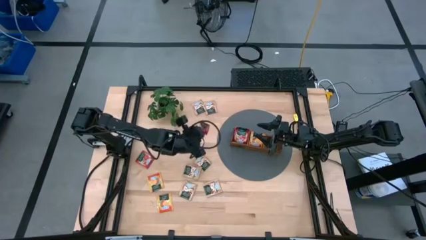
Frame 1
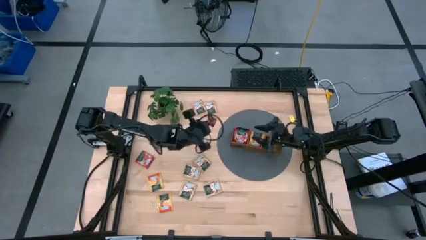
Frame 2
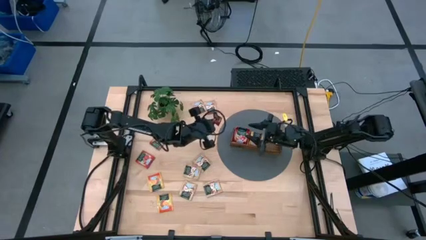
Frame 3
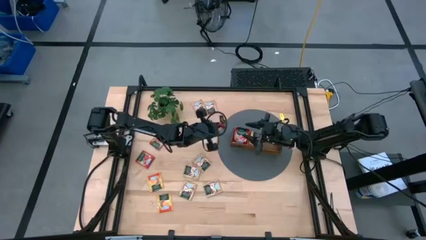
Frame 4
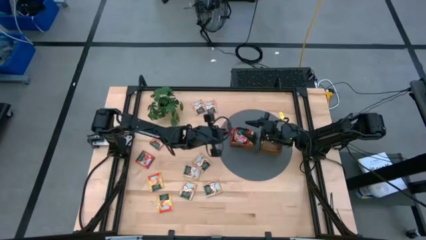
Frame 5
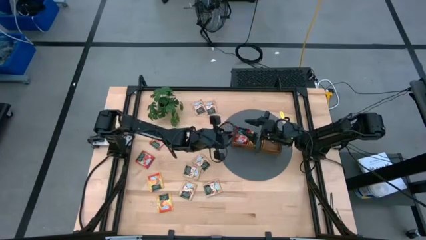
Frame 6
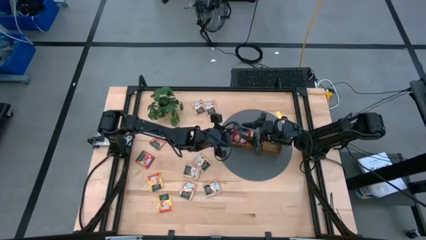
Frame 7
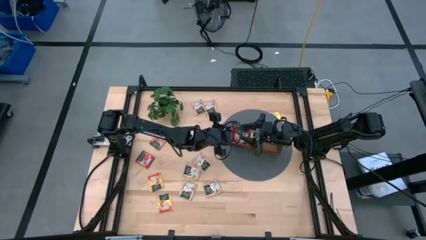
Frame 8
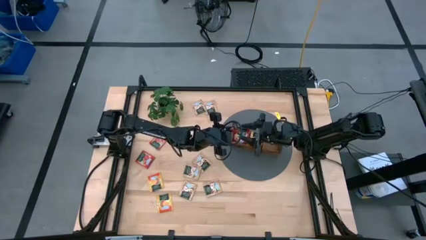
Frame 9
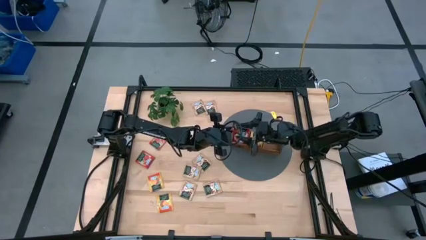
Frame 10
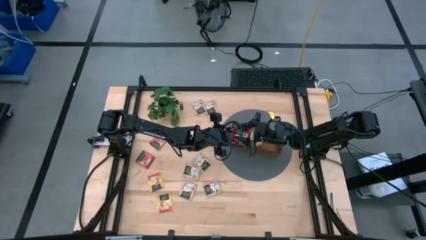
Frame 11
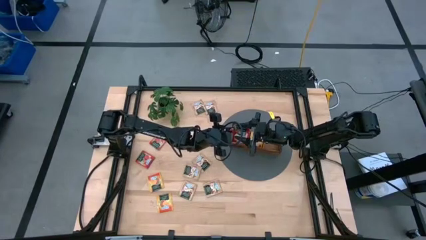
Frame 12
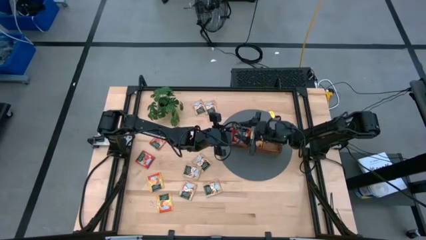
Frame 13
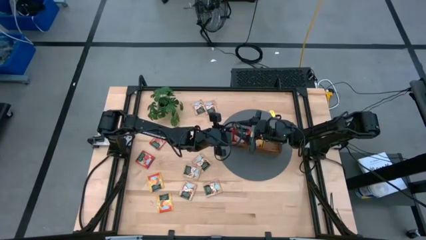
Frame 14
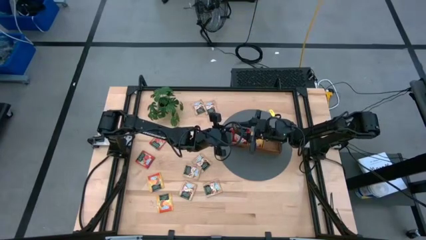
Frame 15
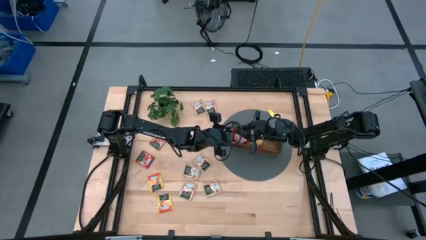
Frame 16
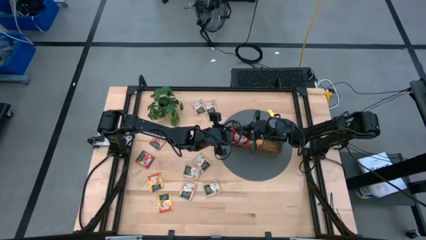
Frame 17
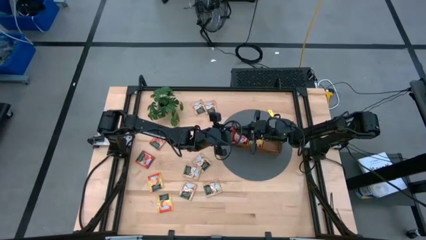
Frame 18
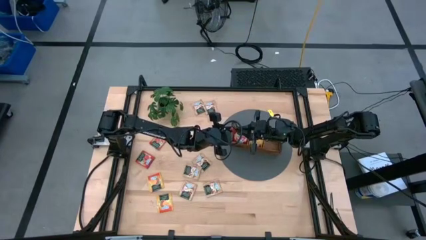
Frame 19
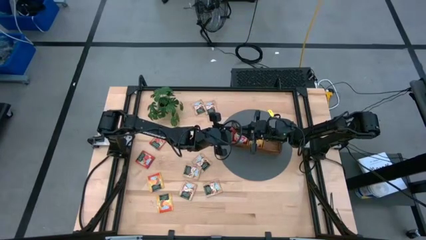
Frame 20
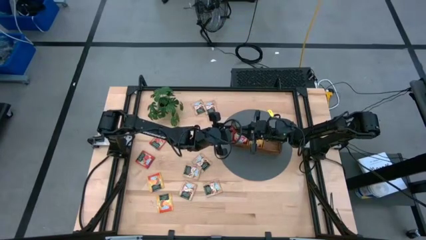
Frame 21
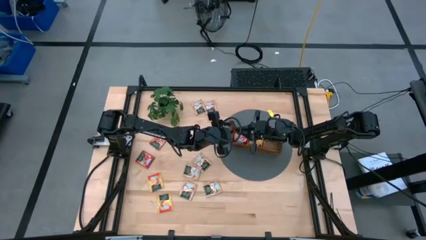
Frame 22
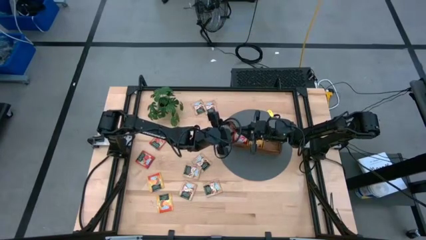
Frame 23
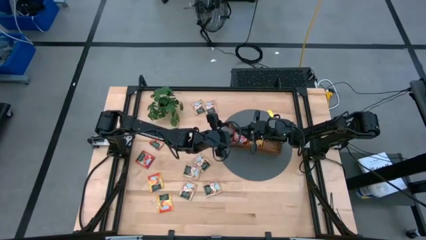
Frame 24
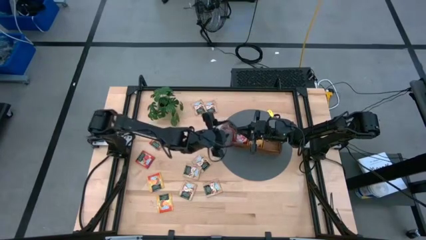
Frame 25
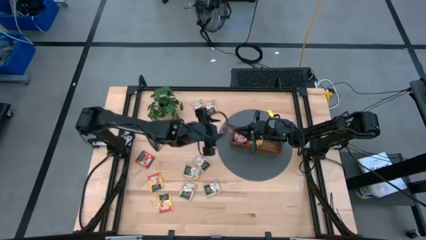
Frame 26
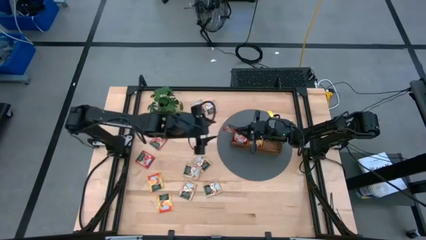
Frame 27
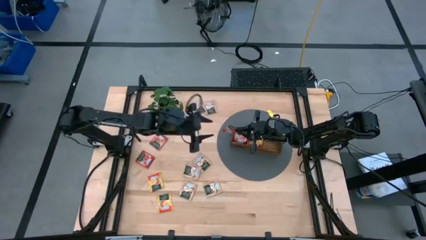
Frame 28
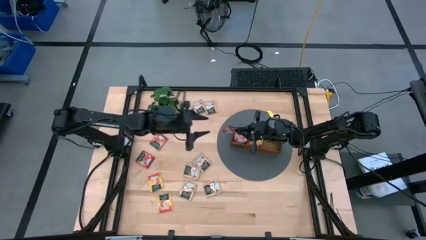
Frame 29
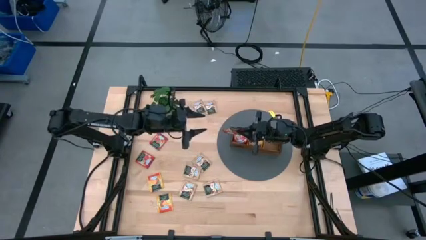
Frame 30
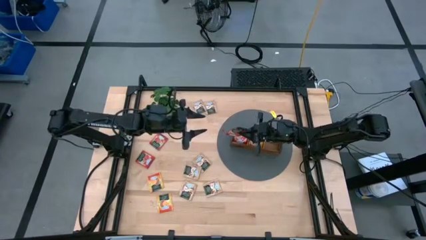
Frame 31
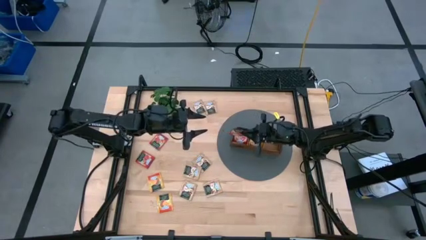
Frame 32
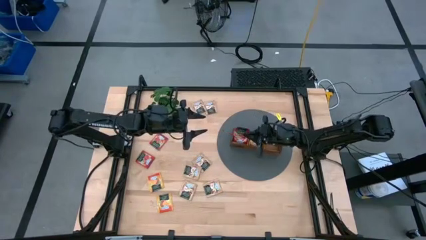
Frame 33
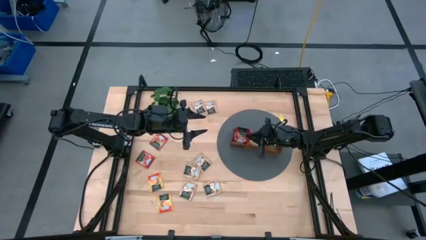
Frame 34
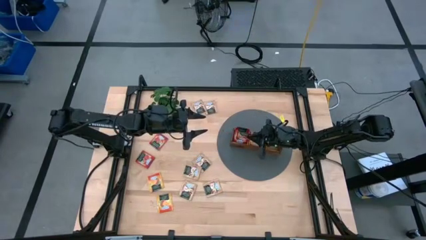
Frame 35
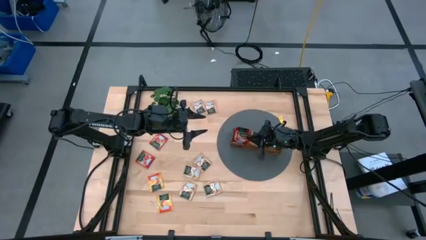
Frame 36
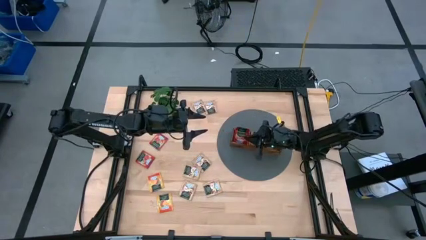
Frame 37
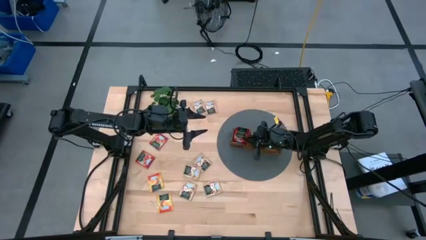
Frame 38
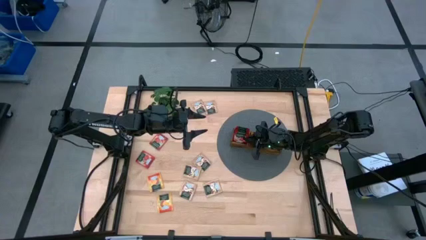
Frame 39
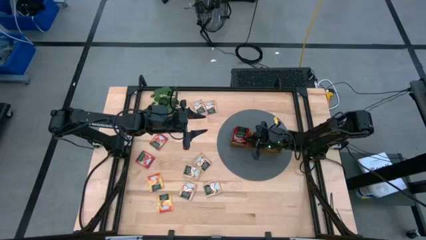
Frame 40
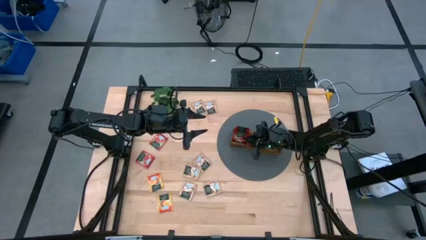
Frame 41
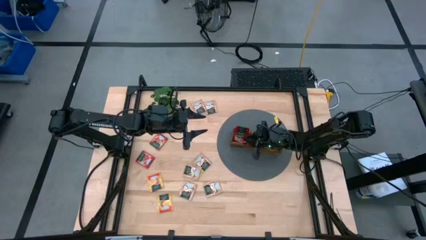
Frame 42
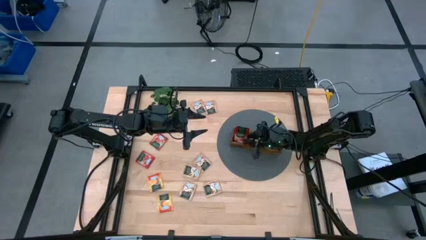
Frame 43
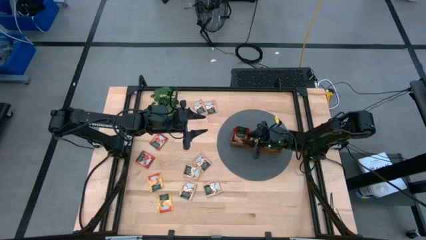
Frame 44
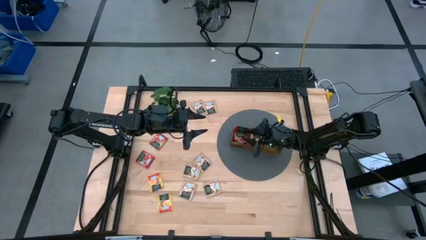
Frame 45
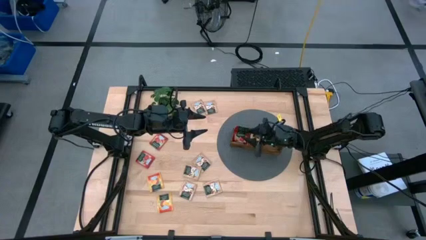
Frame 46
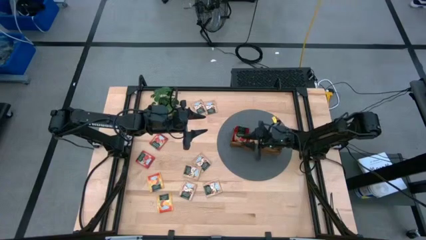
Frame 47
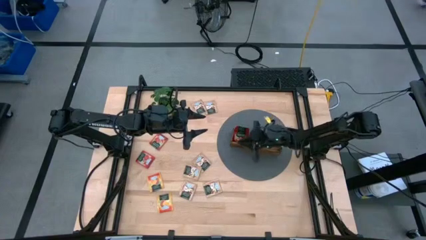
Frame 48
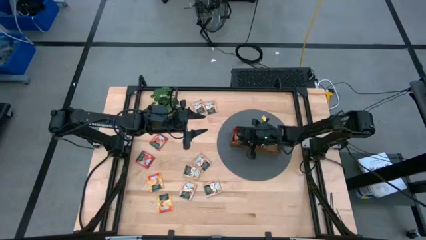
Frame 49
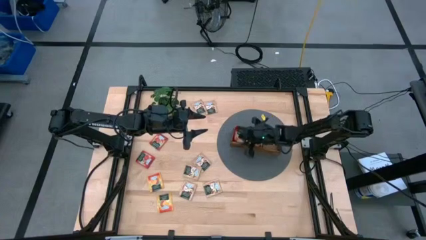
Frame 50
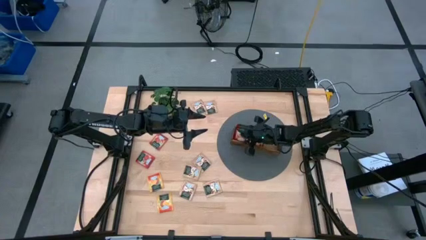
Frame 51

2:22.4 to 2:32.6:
Task: Pick & Place Tea
Put the red tea bag into the left section of the wooden organizer

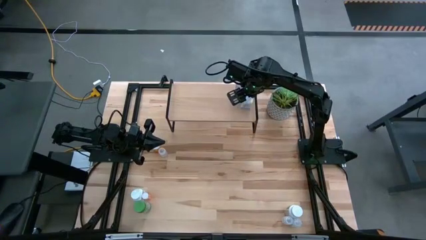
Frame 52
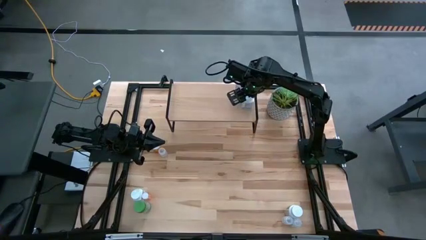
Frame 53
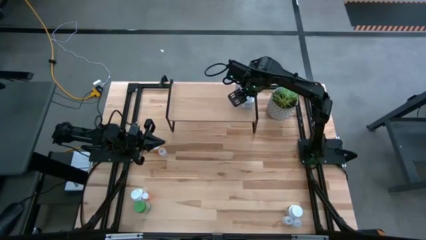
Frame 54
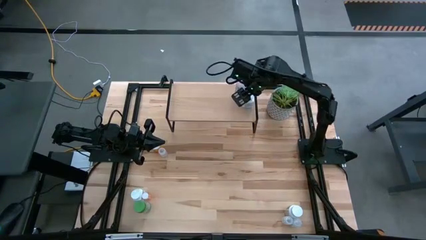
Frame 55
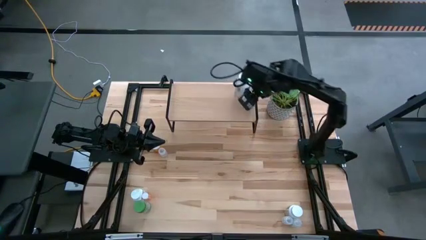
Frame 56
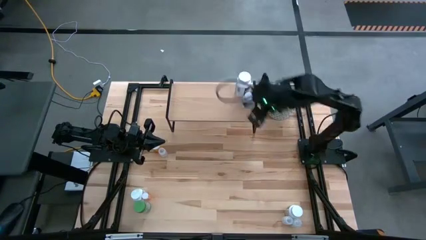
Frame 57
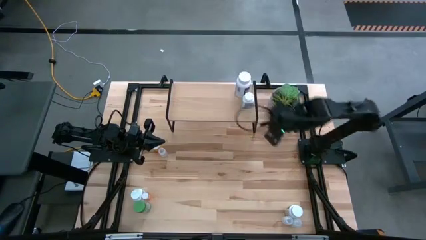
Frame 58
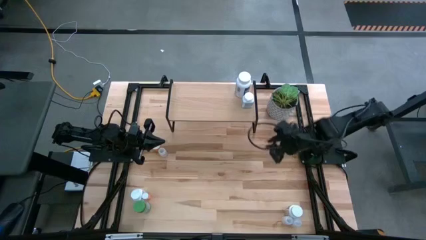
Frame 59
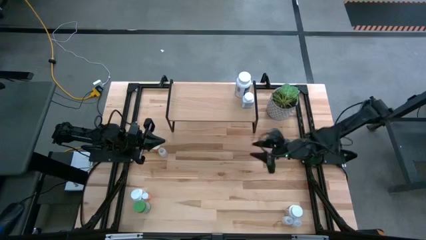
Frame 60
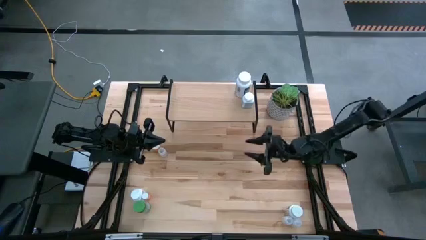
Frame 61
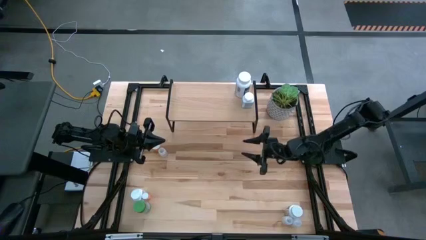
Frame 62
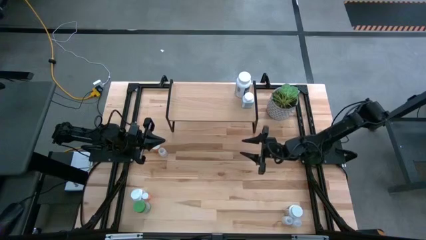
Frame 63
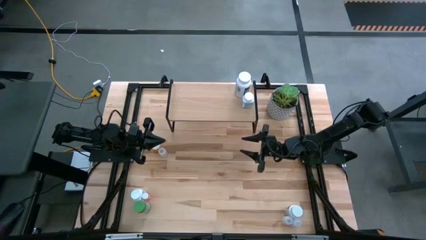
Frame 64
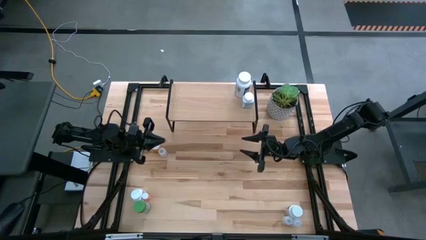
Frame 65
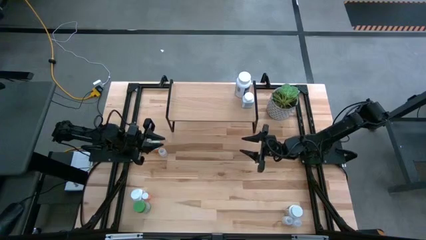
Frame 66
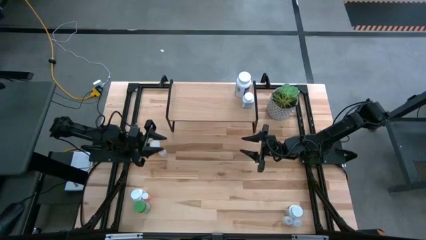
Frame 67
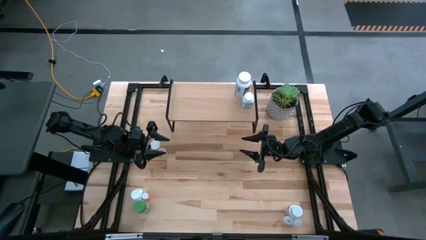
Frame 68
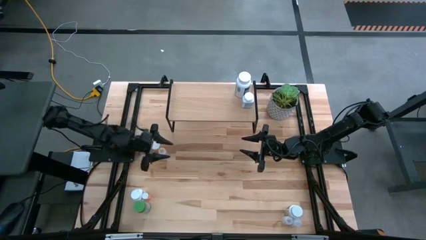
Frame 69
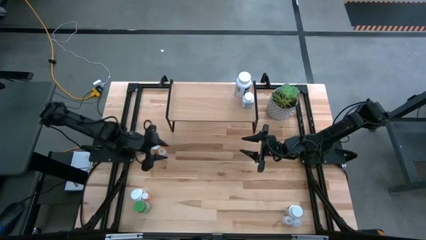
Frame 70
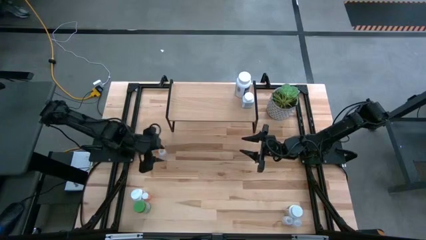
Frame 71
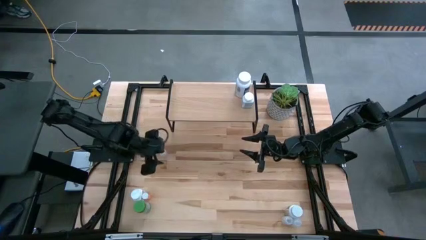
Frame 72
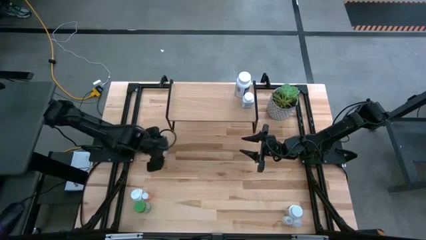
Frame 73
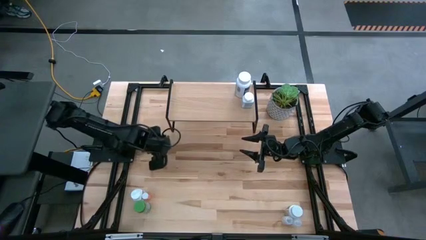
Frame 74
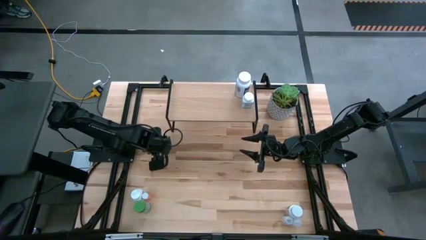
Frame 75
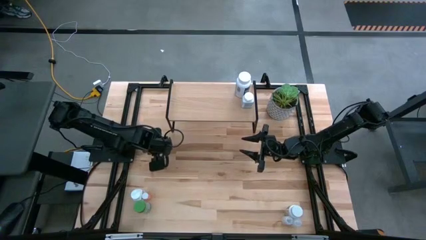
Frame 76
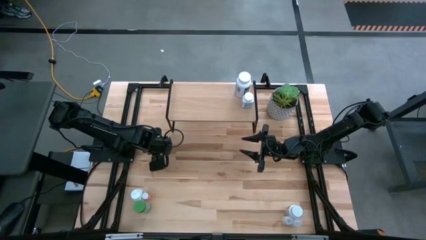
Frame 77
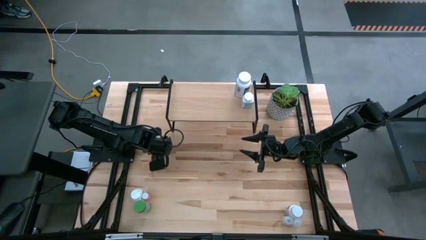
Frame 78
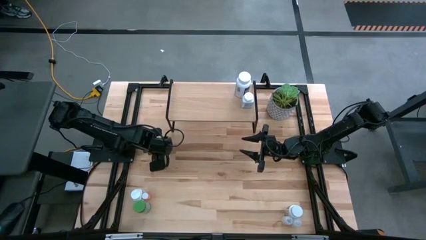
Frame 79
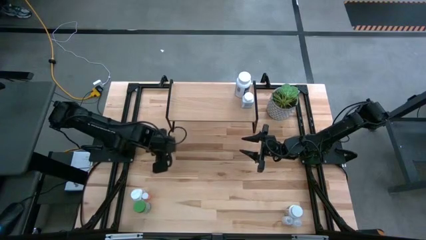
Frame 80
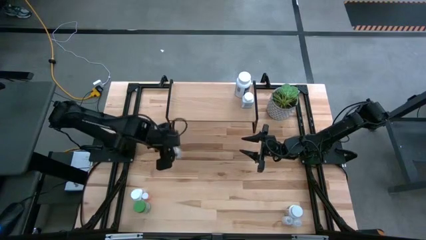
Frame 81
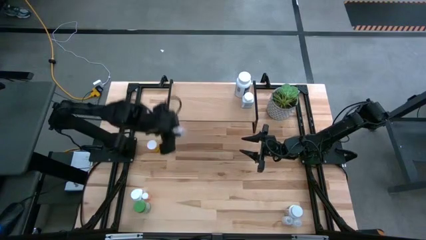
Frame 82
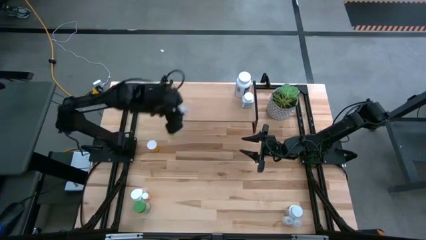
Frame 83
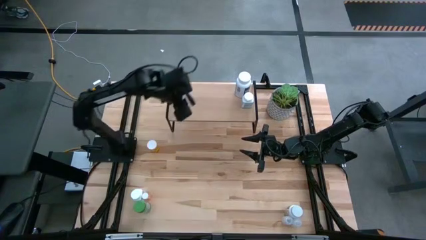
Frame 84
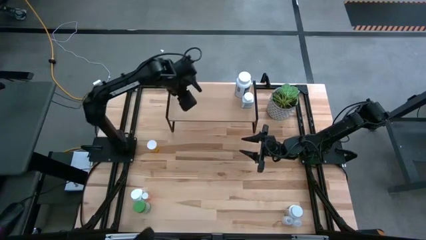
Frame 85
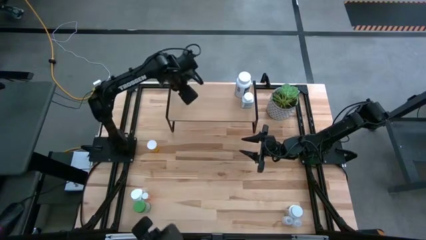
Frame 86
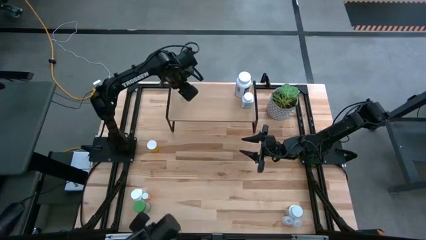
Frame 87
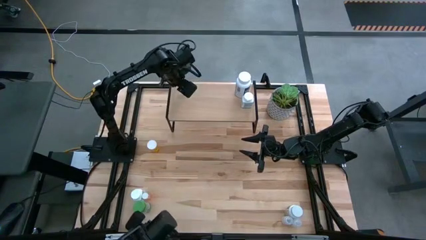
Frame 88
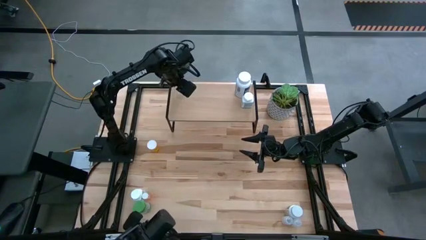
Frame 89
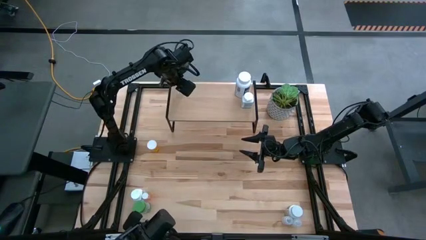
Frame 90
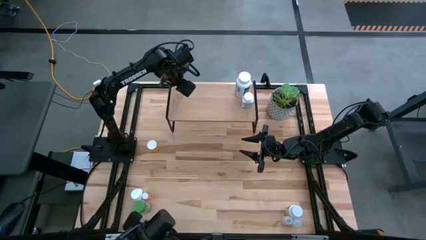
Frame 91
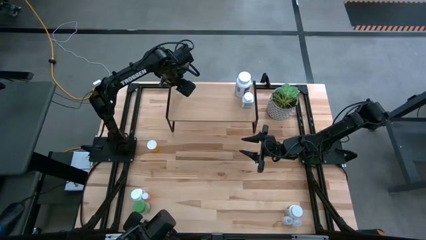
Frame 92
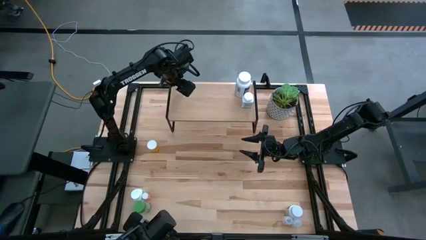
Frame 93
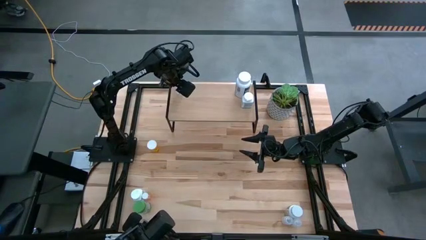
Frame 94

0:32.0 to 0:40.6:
Task: Pick and place medicine bottles onto shelf by color
Put the left transparent pill bottle on the shelf
